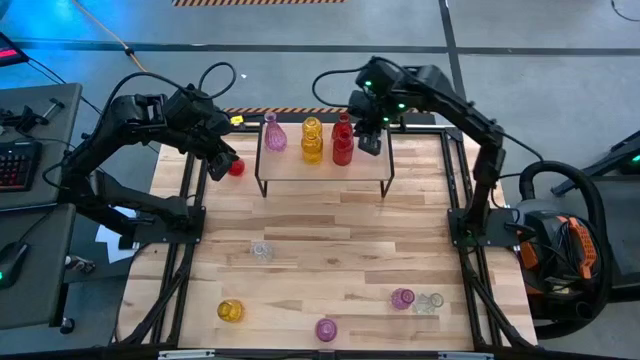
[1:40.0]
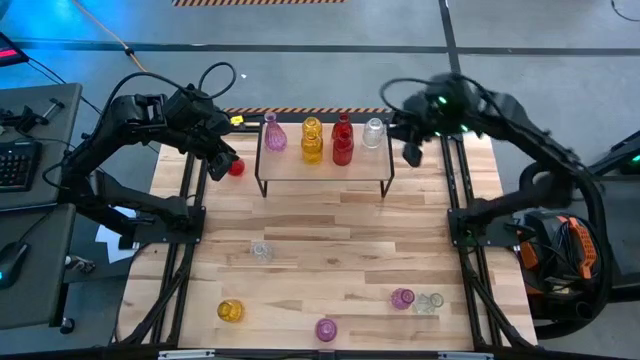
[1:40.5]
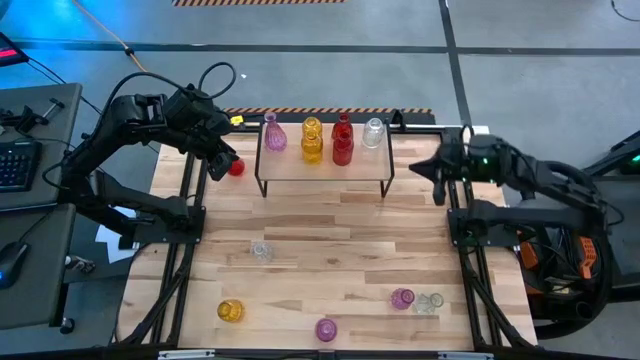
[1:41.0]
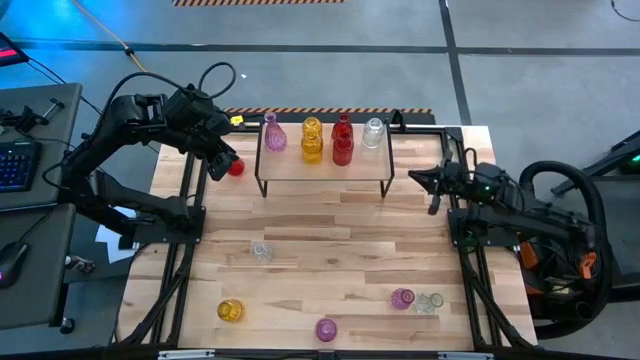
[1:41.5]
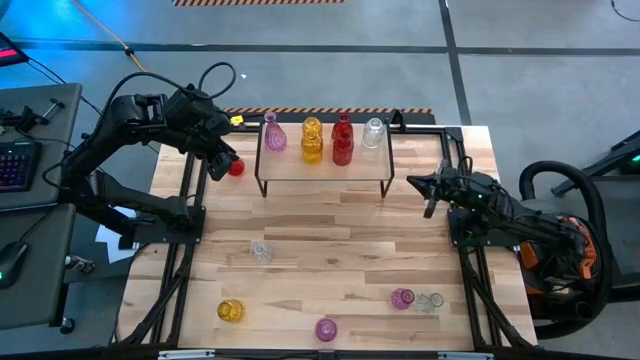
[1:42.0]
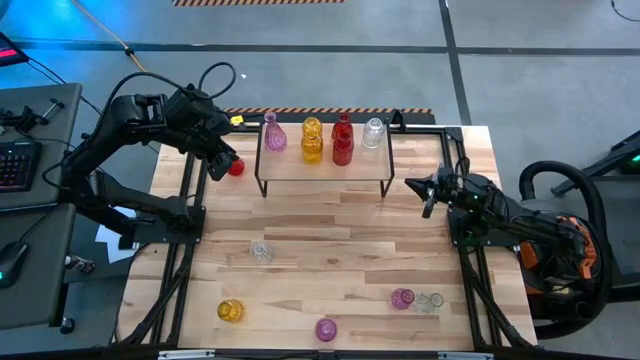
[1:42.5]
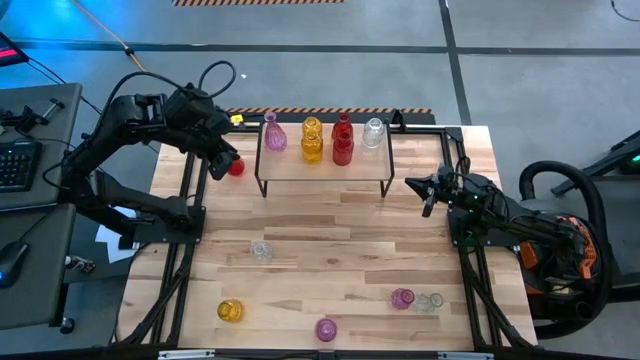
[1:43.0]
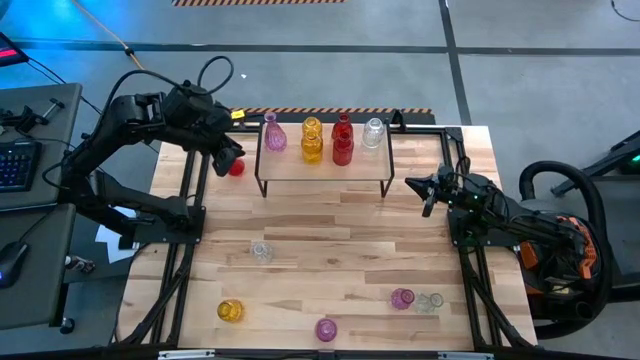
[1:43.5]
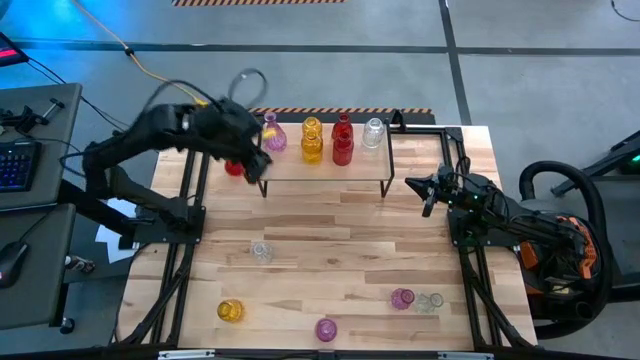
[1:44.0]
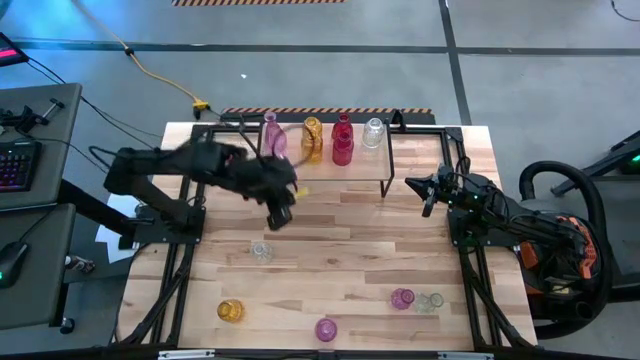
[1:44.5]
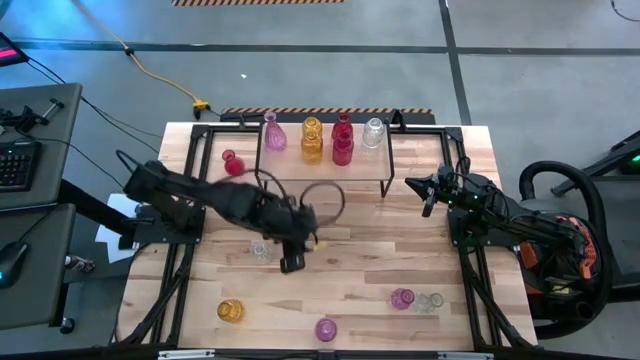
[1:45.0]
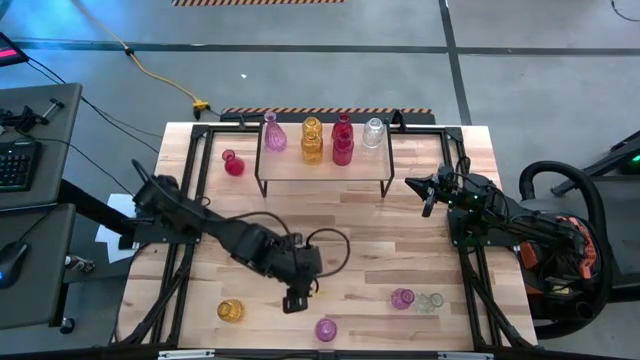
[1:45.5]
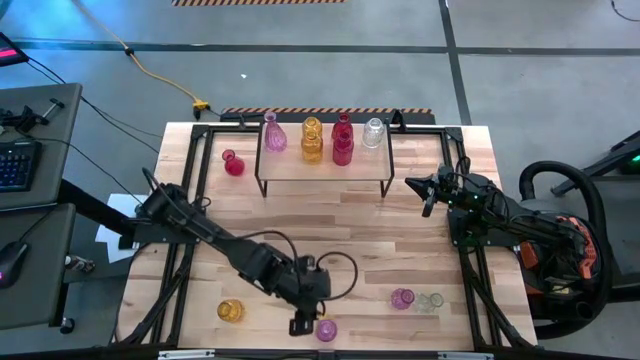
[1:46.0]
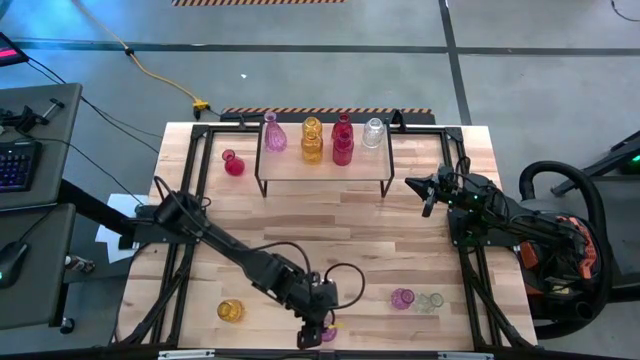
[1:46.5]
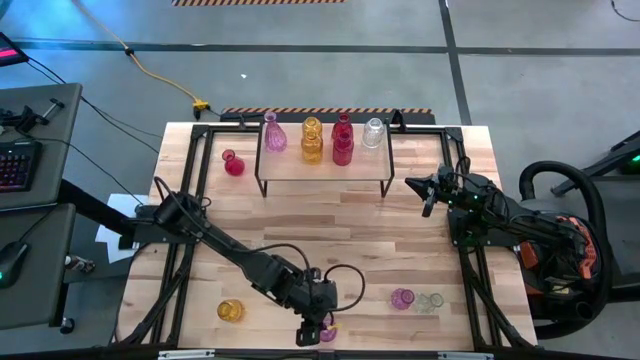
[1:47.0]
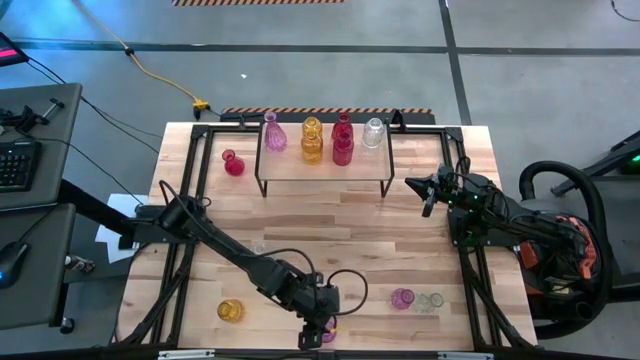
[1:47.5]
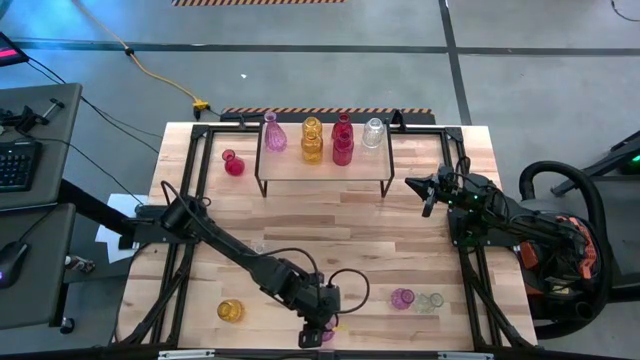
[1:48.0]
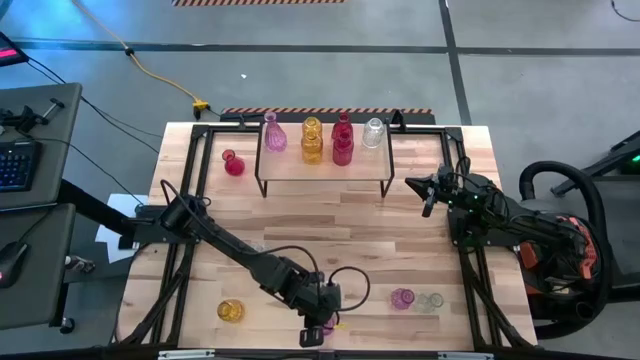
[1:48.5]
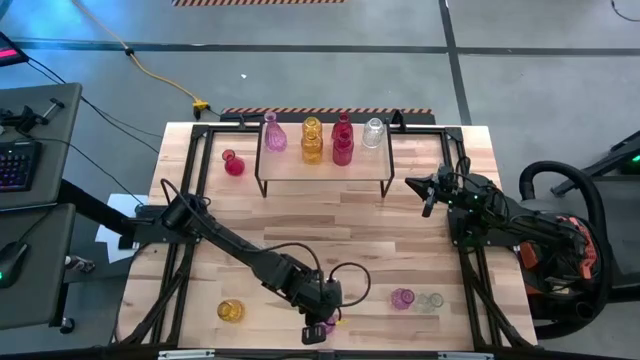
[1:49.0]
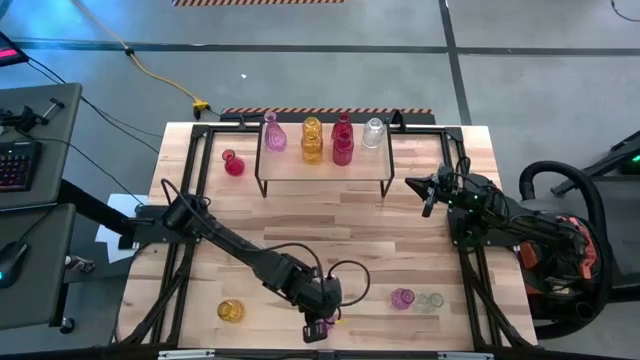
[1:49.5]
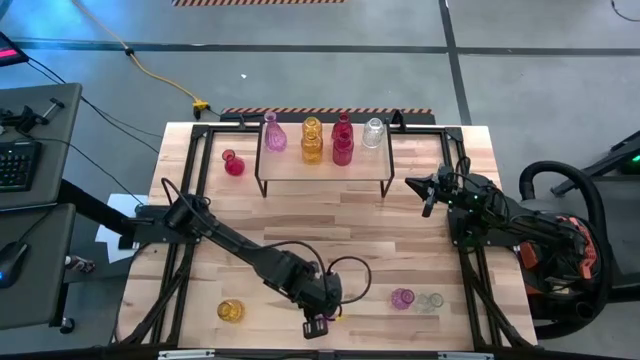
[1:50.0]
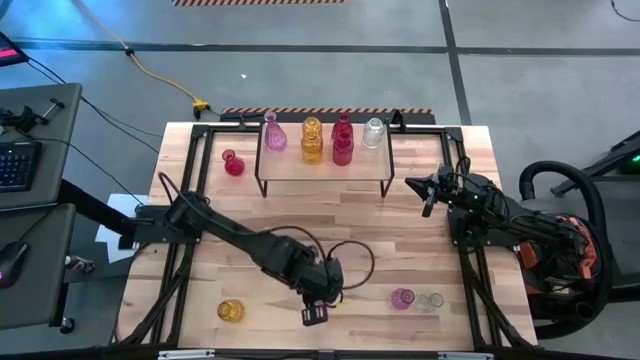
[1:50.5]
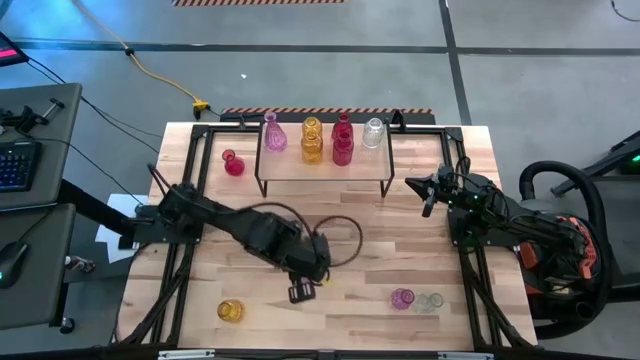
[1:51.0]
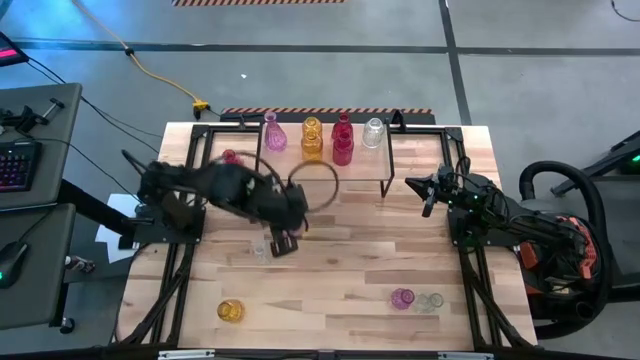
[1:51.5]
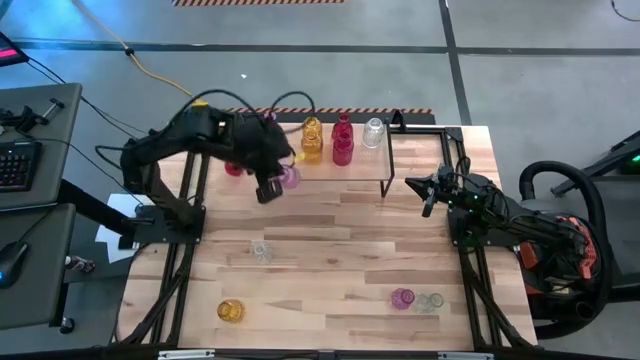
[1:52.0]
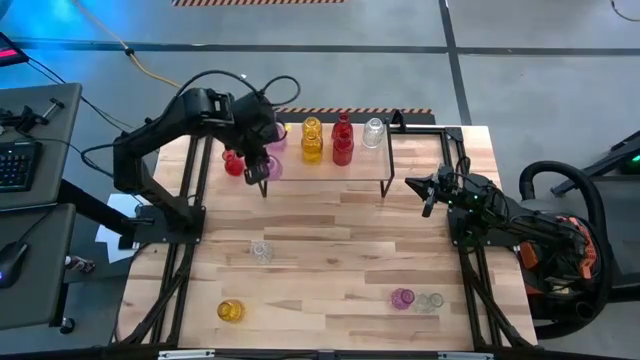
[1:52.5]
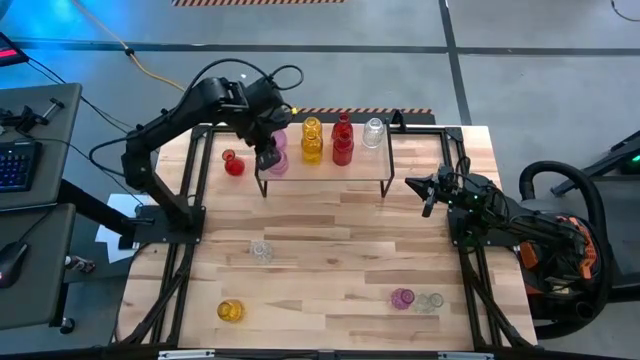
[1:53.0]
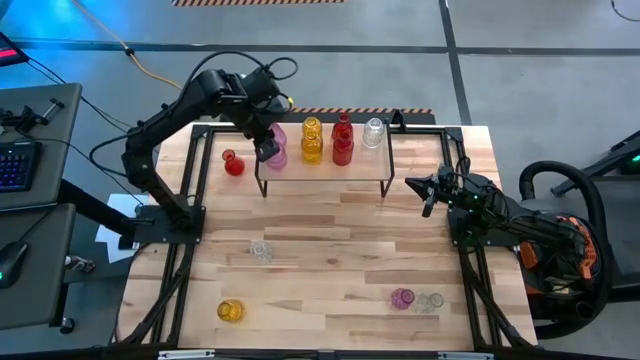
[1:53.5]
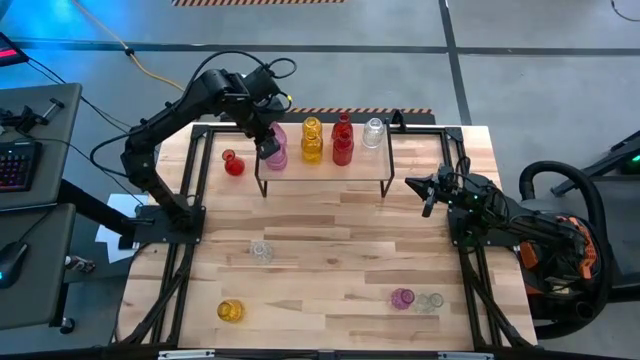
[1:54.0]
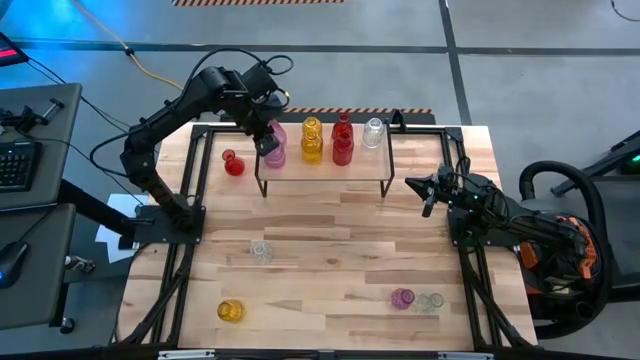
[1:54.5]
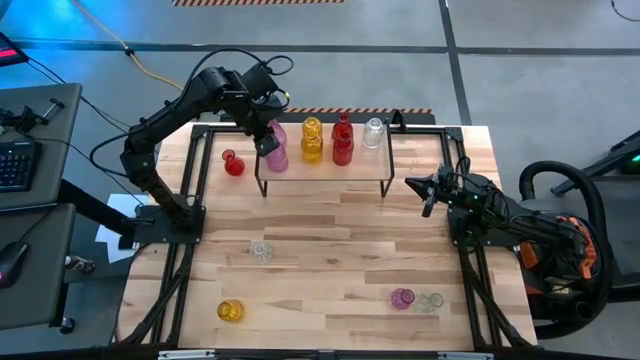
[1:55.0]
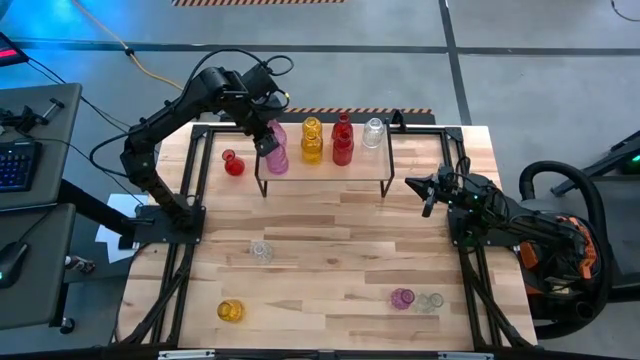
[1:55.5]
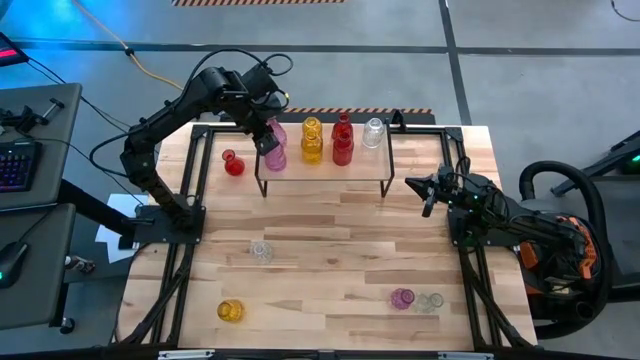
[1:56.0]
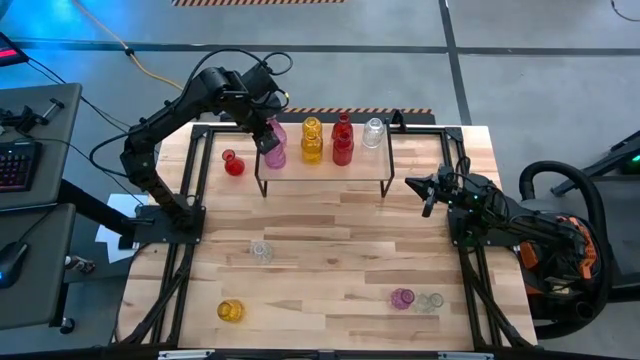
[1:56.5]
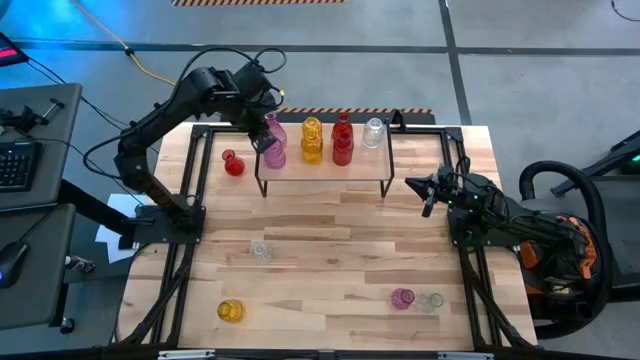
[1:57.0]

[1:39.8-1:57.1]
Task: sort vases onto shelf
Put the left pink vase on the shelf aligned with the other pink vase

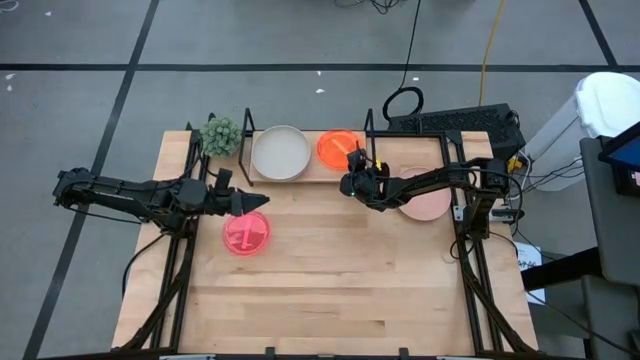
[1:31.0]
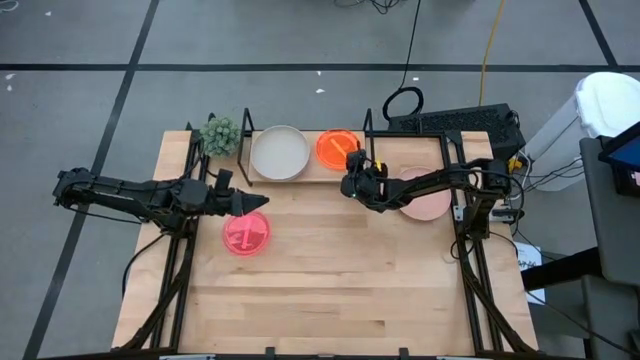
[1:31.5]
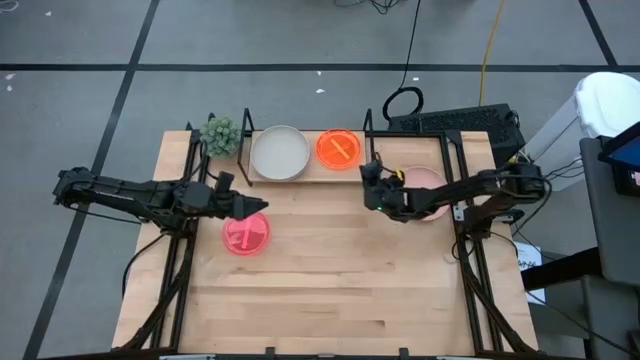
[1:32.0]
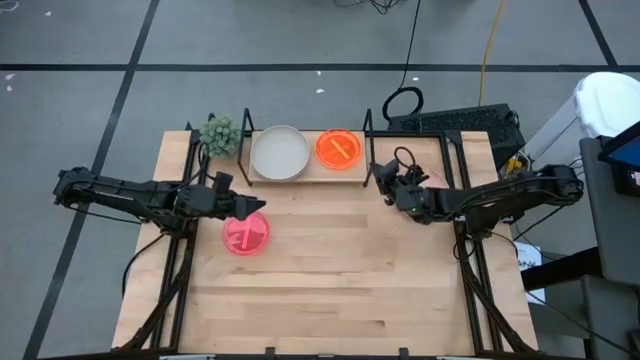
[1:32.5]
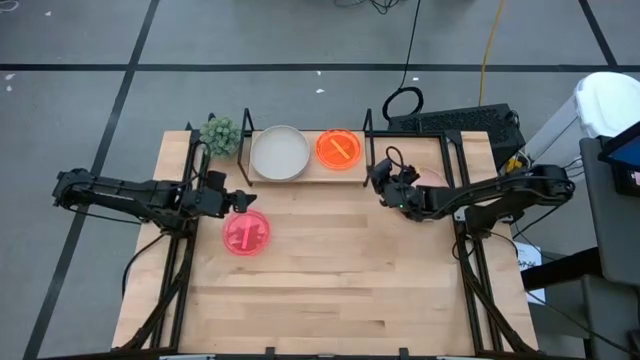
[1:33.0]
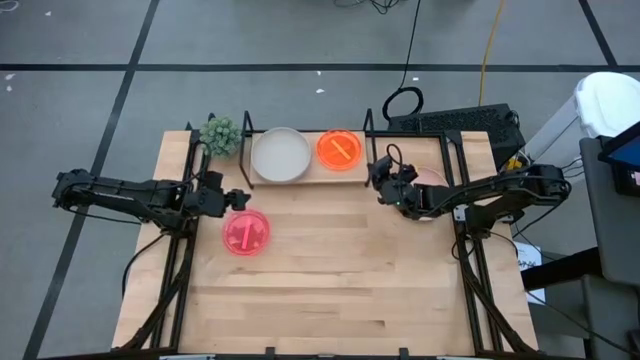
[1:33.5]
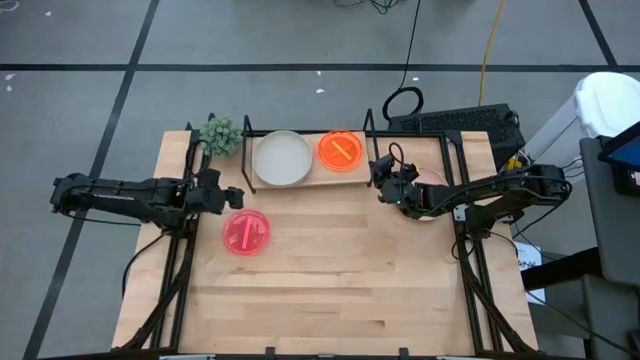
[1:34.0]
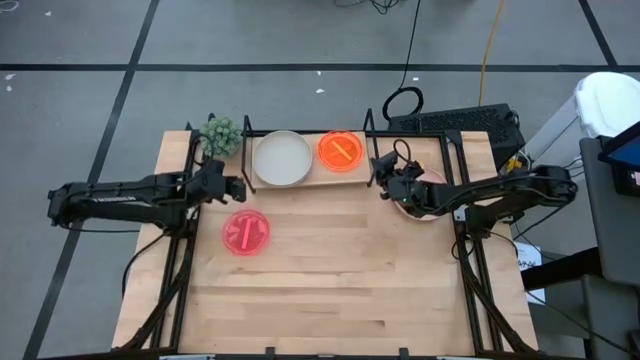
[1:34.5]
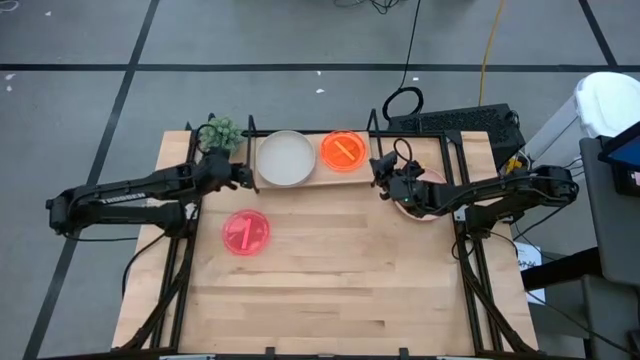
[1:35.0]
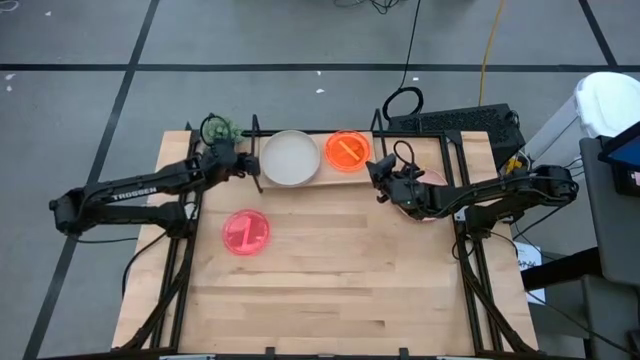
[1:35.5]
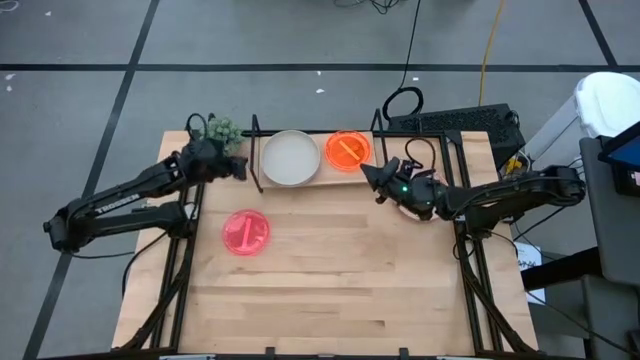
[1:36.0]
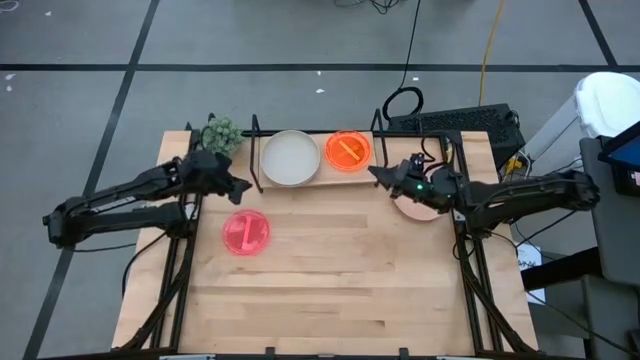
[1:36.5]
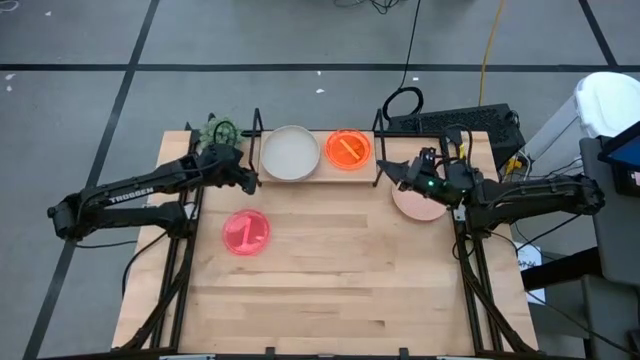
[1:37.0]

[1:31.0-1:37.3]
Task: Place and stack plates onto a shelf
Adjust the position of the shelf
